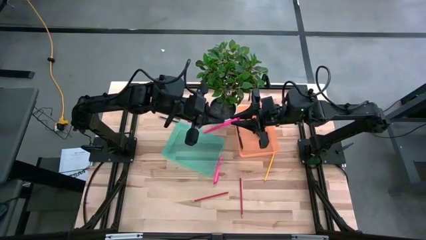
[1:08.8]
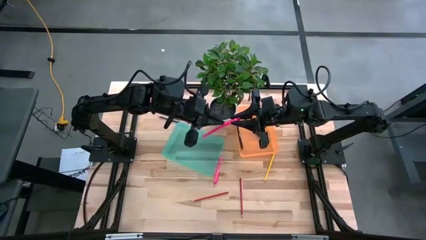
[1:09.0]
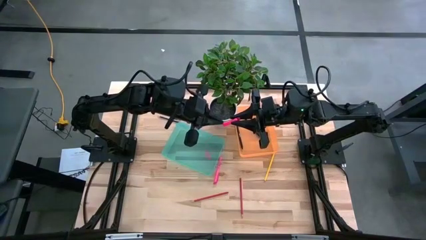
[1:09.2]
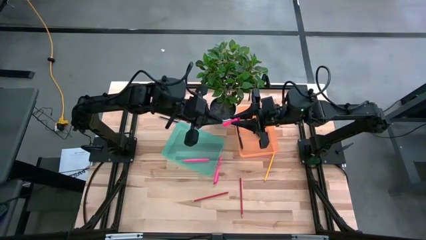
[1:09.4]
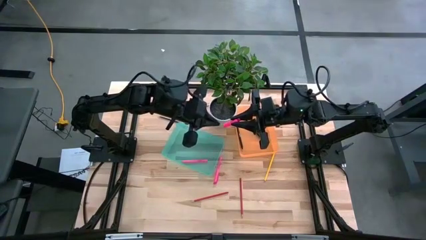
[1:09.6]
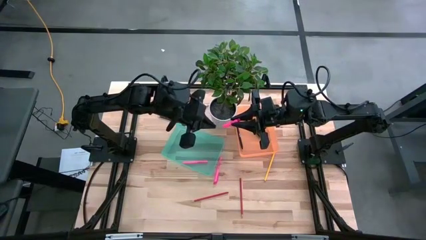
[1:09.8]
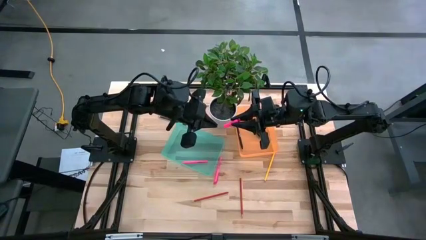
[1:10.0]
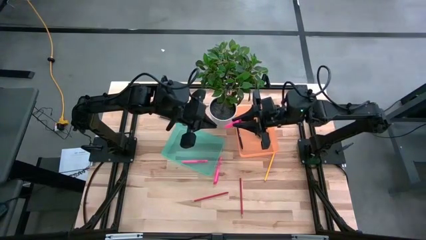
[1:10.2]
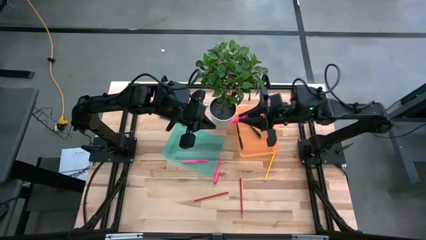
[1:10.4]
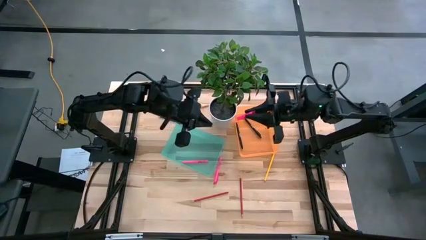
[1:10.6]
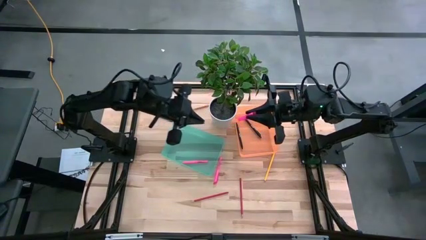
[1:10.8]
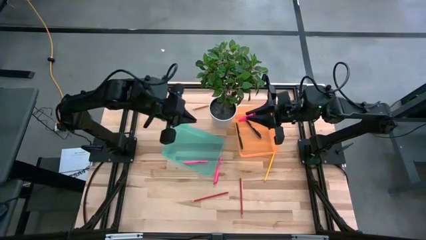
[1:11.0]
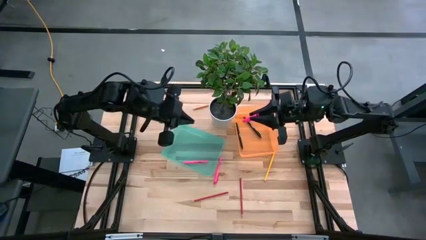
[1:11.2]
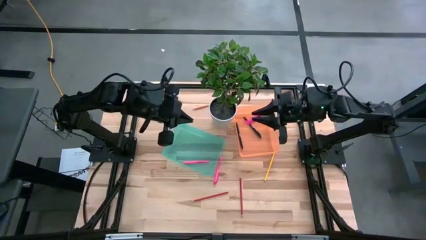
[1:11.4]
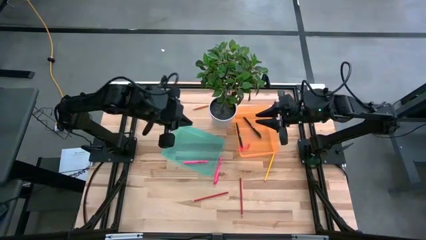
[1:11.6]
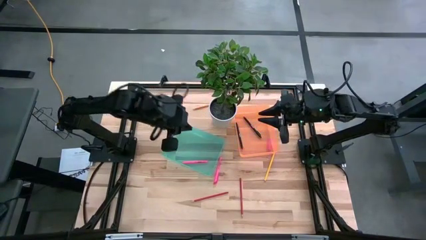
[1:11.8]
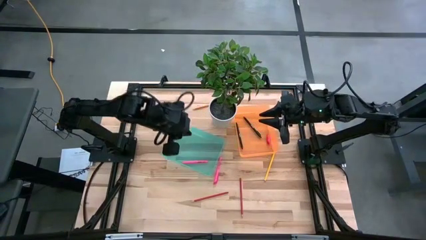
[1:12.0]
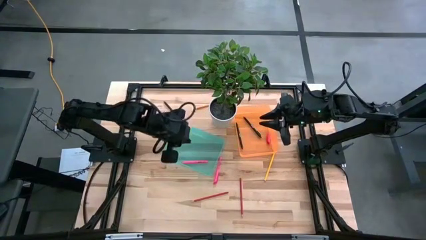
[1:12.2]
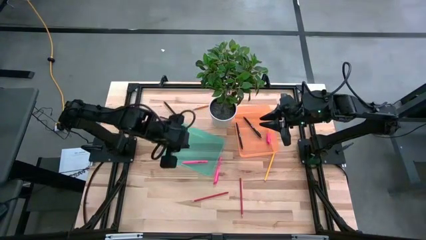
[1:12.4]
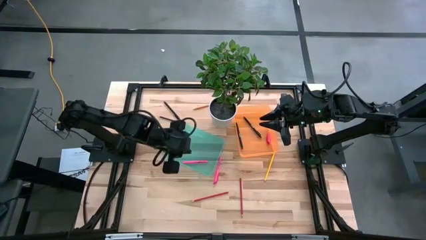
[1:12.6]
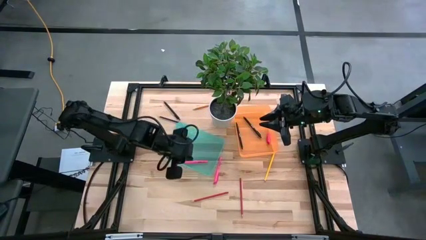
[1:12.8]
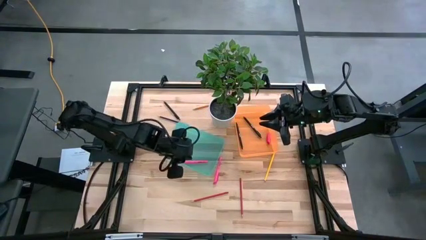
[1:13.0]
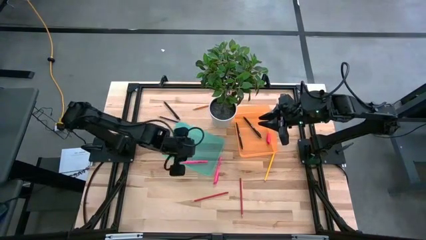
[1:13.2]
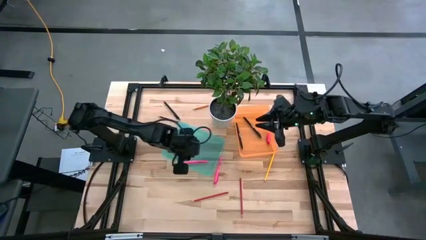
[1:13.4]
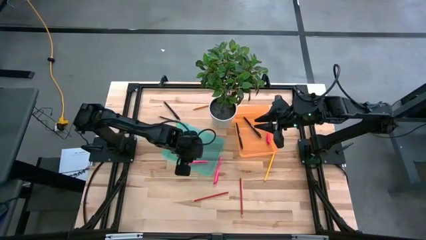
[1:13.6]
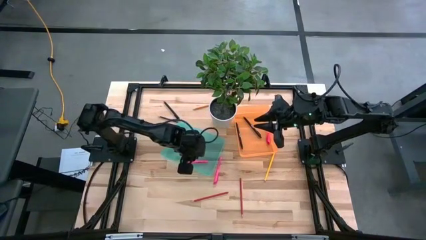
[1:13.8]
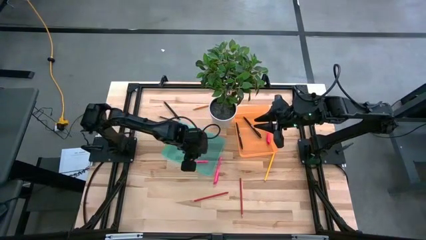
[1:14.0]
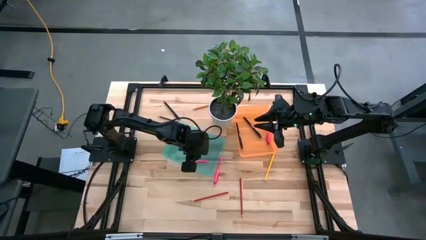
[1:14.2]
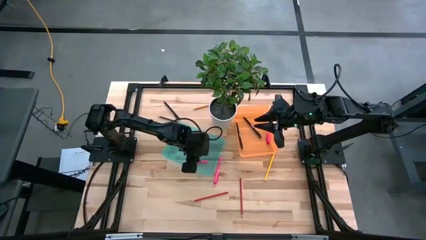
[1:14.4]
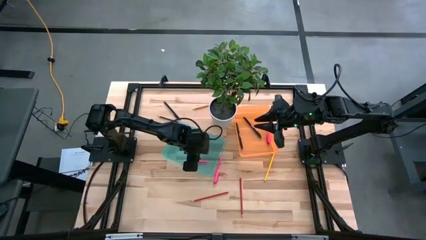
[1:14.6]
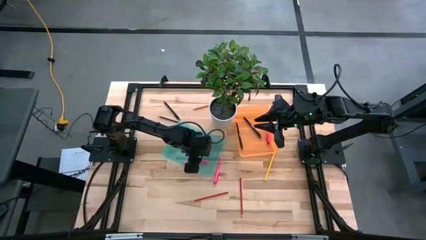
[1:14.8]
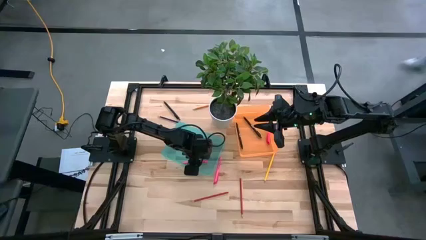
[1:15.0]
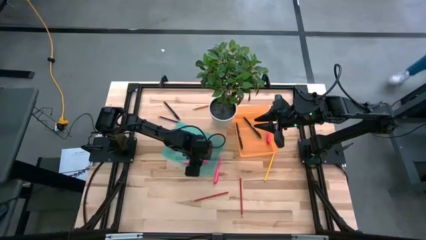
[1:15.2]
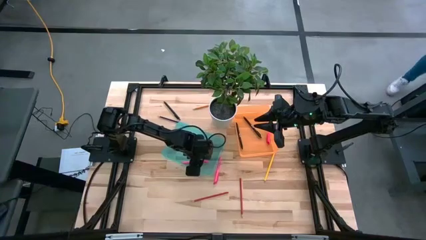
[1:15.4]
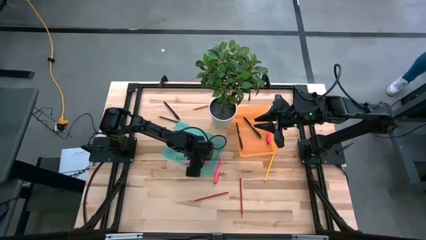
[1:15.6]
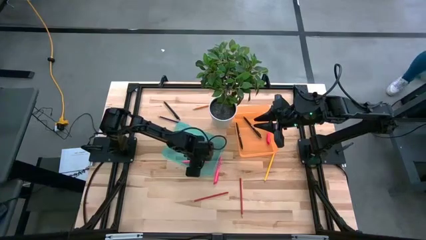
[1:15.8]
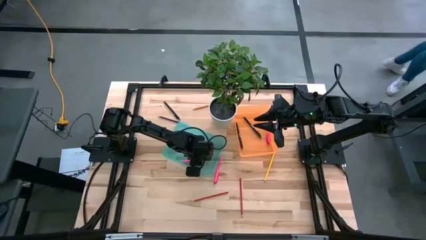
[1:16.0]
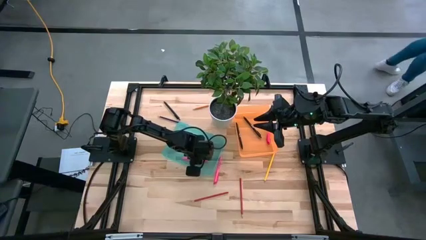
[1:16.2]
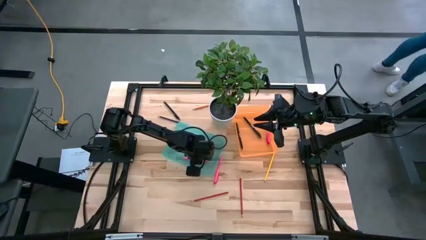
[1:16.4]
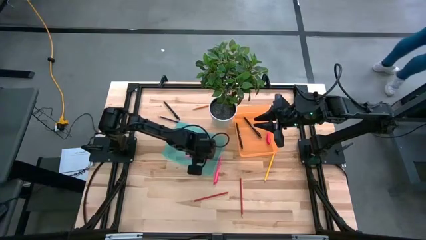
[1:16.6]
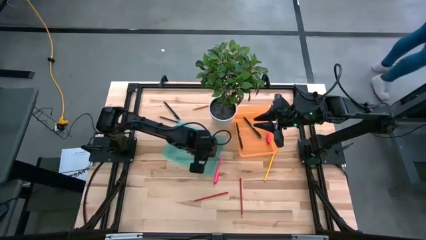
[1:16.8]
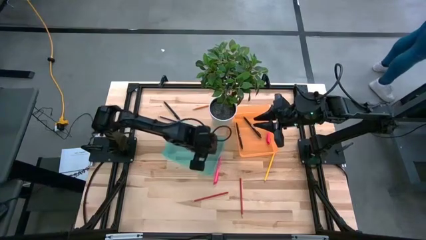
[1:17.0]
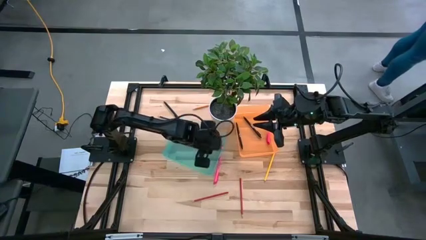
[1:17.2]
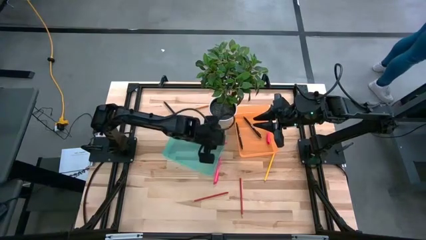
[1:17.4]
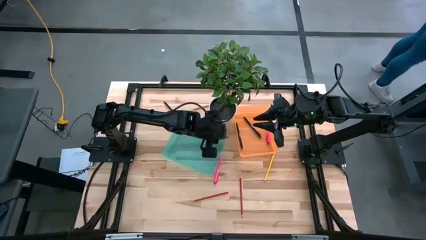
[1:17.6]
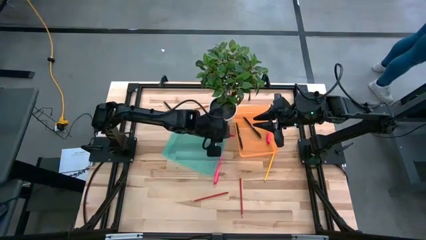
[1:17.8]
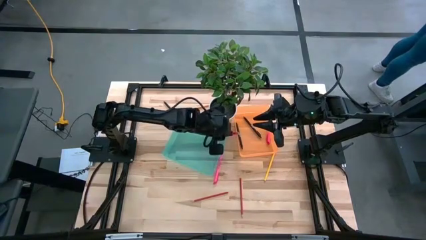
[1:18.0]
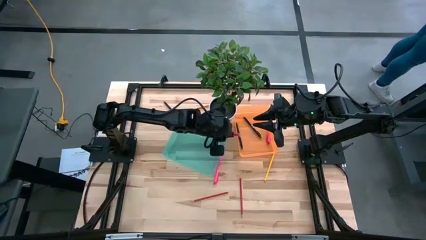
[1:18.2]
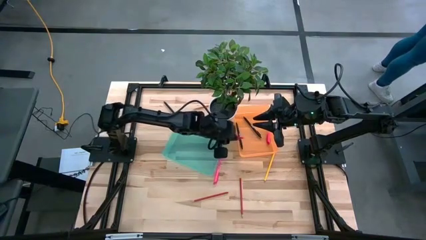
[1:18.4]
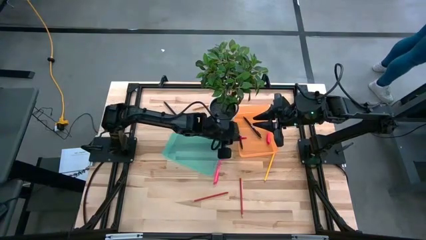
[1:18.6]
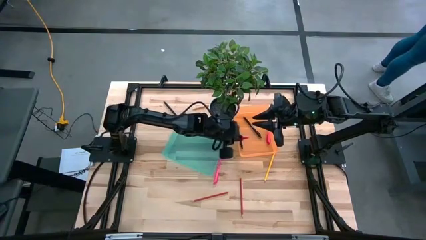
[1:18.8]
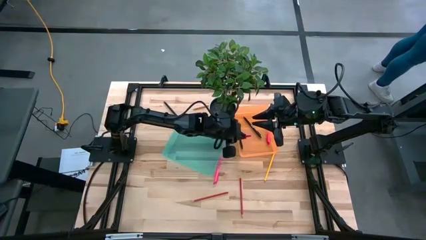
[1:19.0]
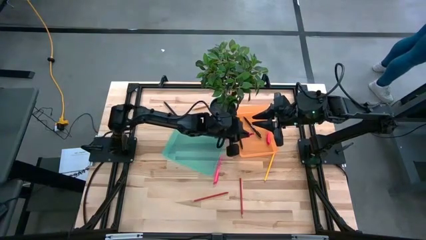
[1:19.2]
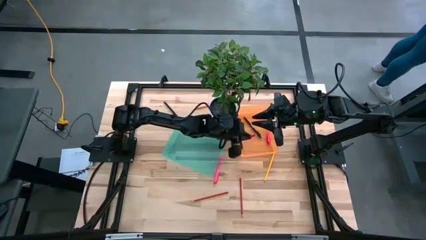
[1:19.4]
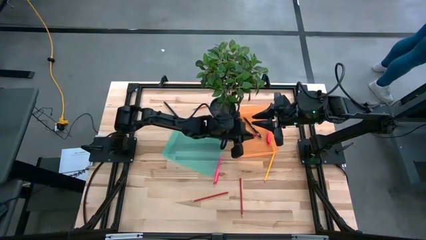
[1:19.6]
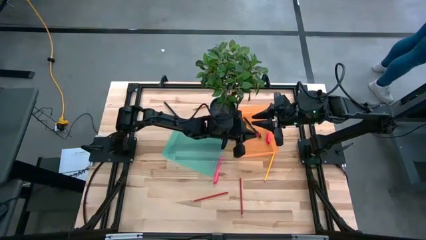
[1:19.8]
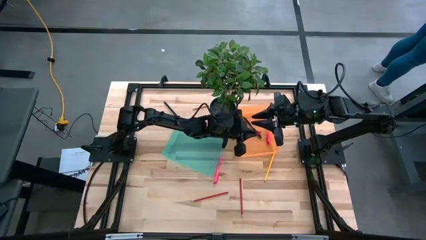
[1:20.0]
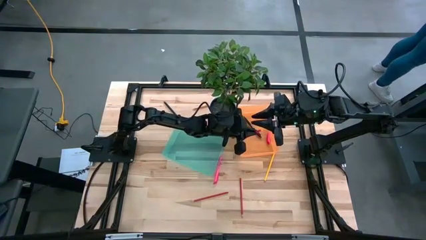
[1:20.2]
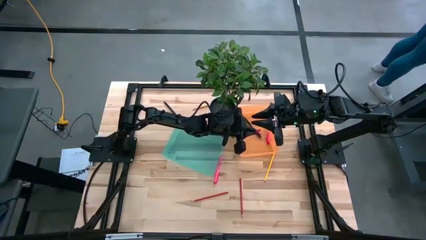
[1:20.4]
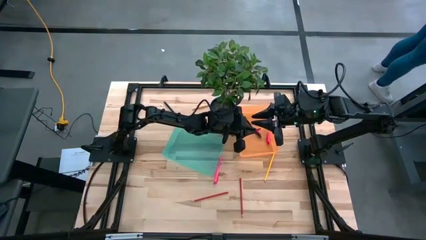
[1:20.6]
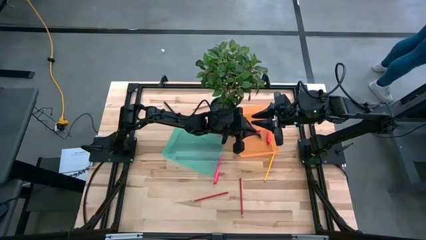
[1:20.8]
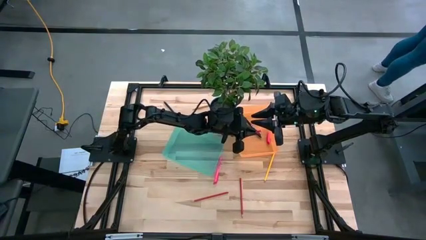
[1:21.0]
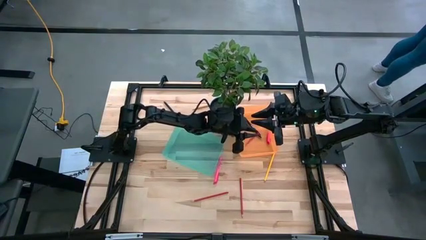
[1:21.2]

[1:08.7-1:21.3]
Task: Sort pens & pencils
Put the bottom pink pen into the orange bin
